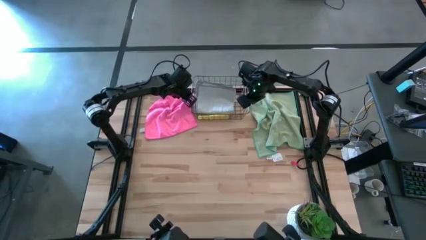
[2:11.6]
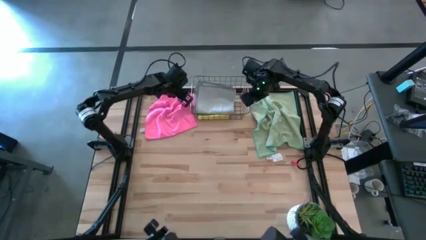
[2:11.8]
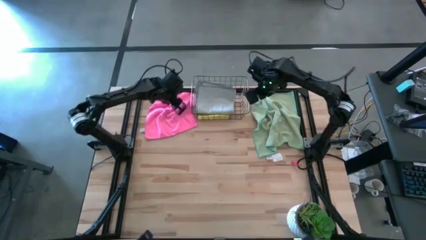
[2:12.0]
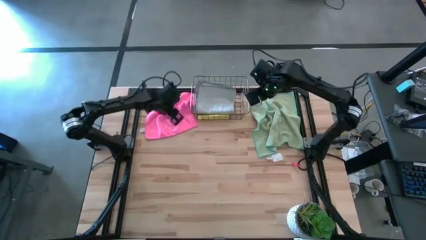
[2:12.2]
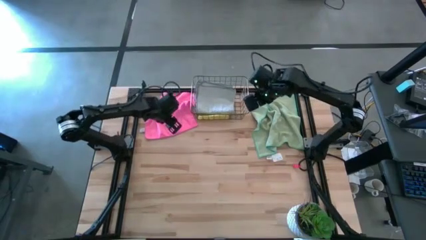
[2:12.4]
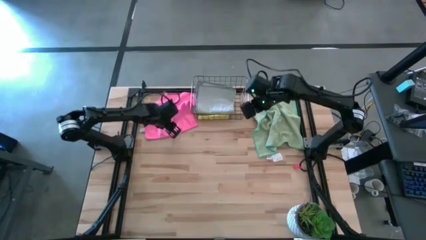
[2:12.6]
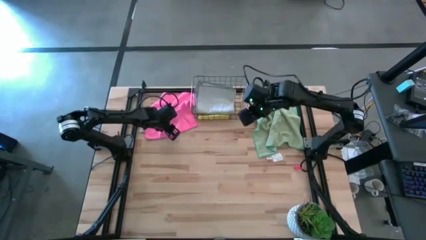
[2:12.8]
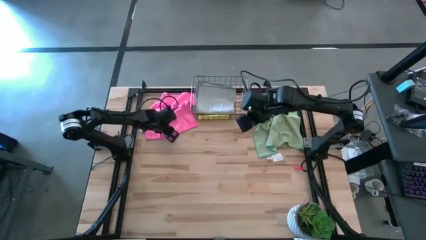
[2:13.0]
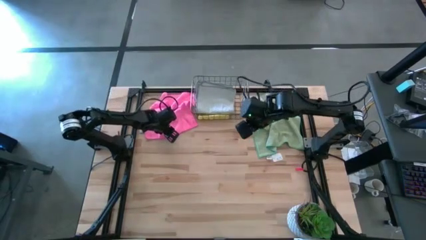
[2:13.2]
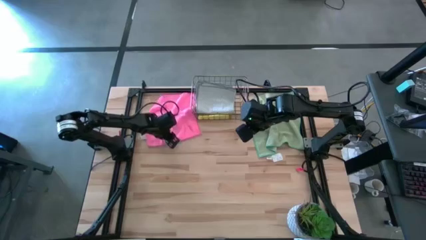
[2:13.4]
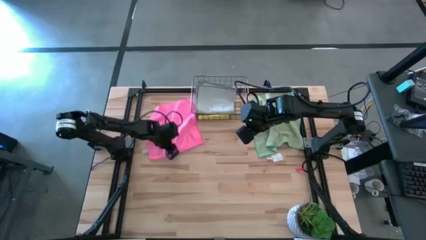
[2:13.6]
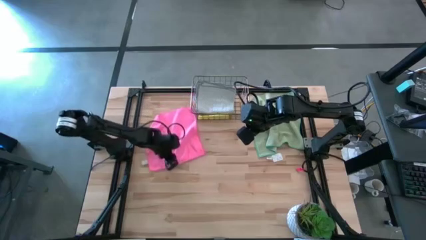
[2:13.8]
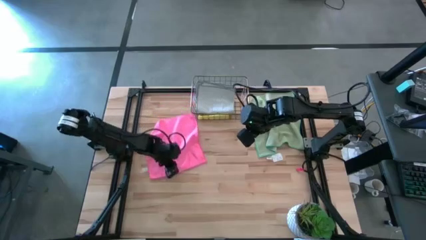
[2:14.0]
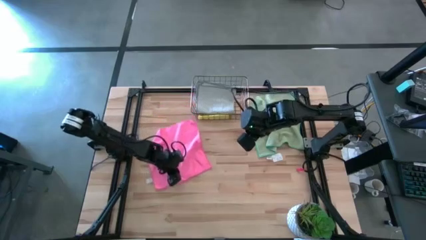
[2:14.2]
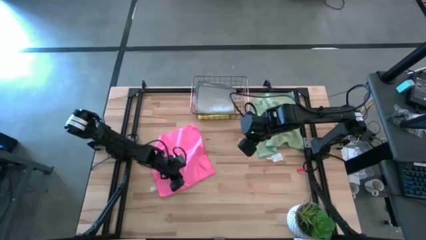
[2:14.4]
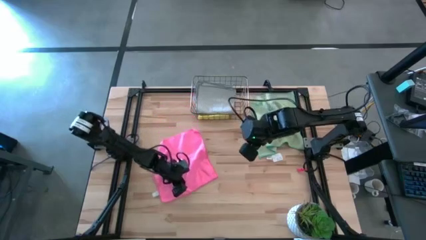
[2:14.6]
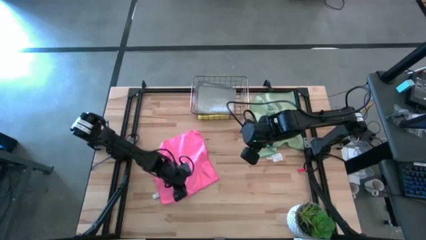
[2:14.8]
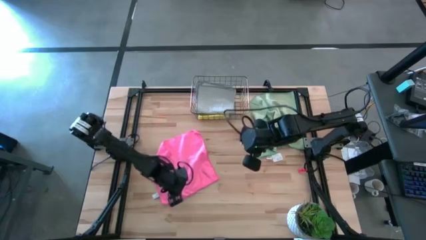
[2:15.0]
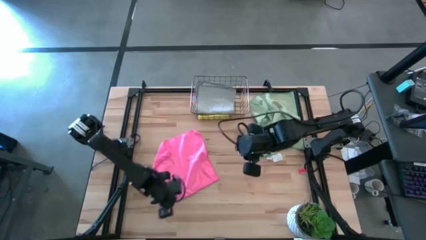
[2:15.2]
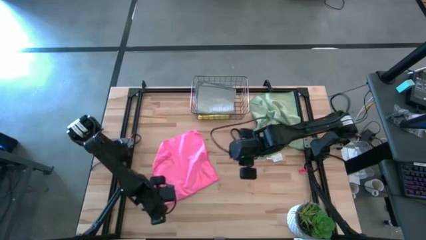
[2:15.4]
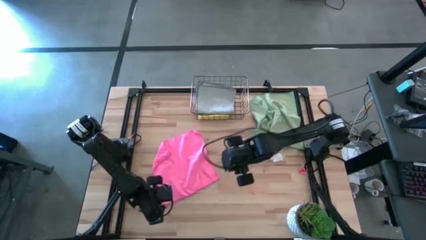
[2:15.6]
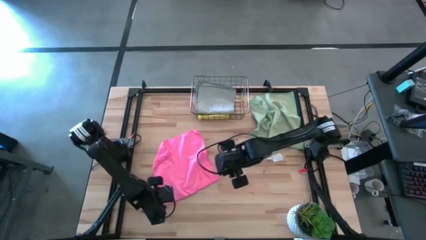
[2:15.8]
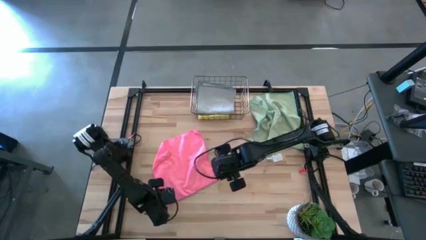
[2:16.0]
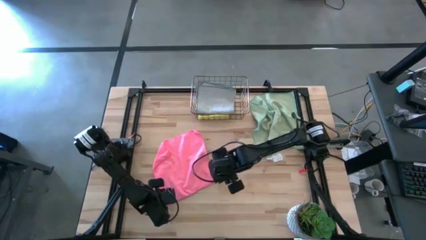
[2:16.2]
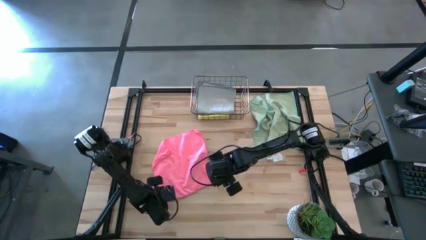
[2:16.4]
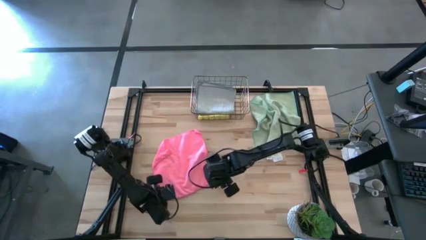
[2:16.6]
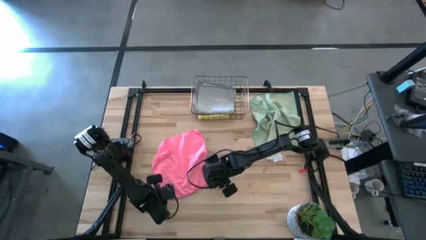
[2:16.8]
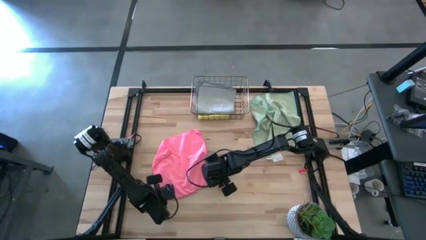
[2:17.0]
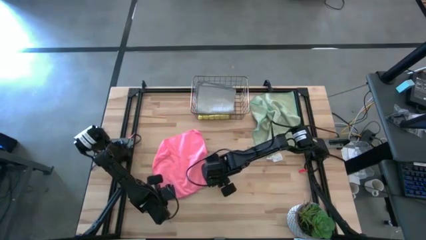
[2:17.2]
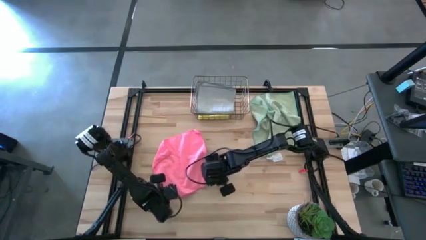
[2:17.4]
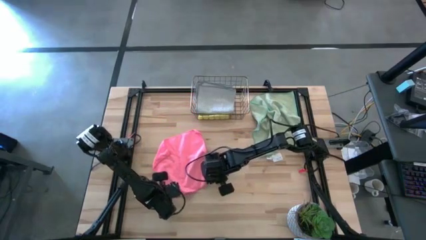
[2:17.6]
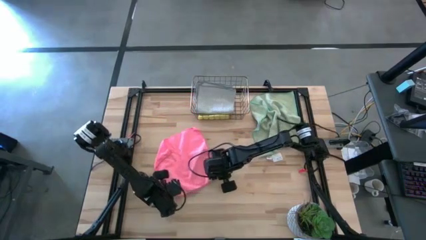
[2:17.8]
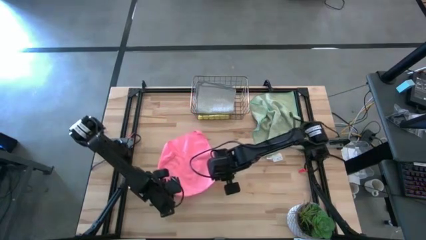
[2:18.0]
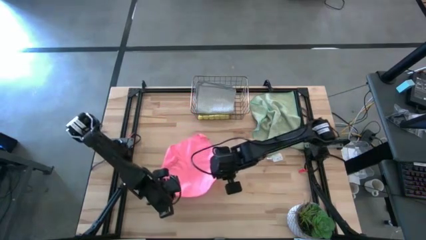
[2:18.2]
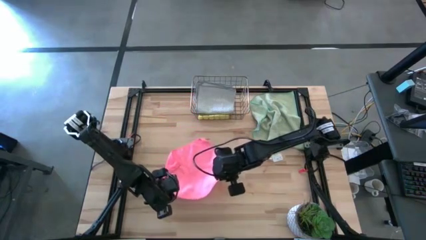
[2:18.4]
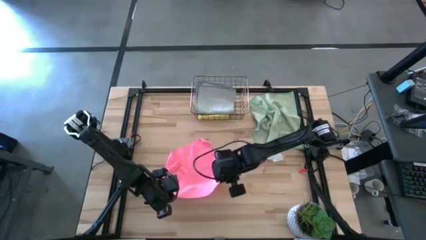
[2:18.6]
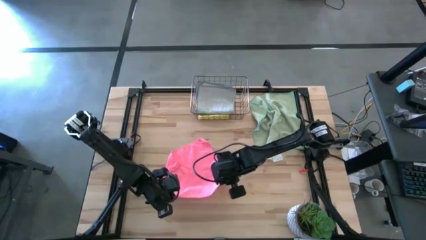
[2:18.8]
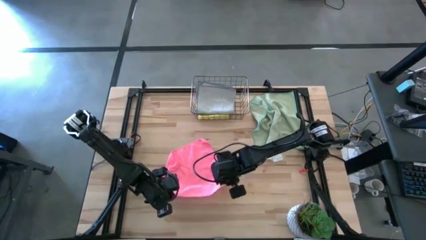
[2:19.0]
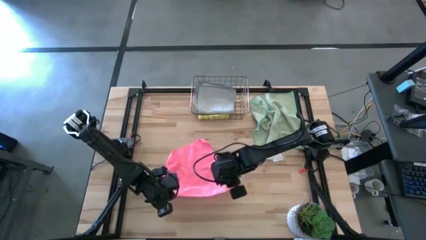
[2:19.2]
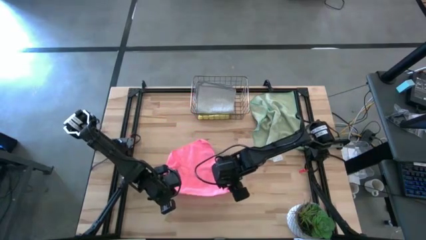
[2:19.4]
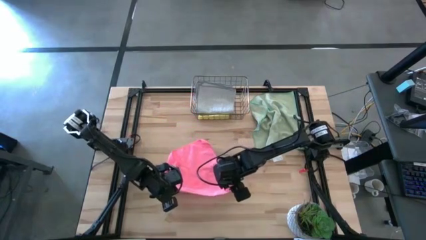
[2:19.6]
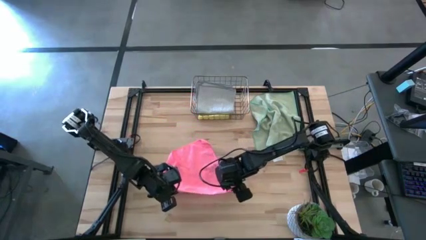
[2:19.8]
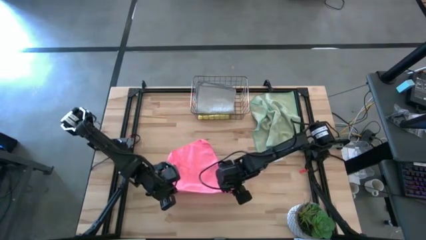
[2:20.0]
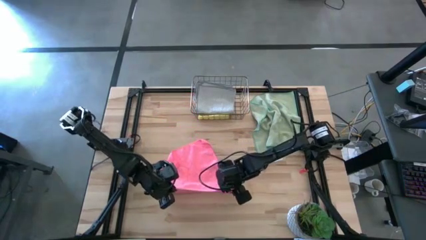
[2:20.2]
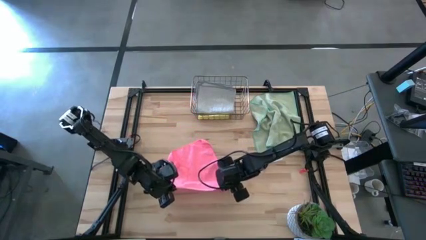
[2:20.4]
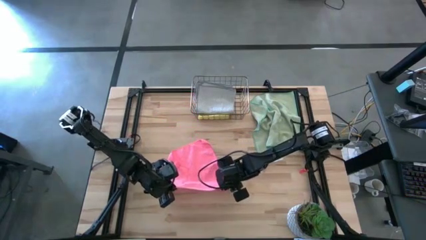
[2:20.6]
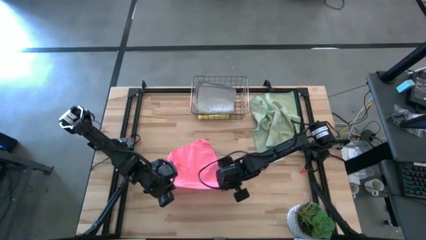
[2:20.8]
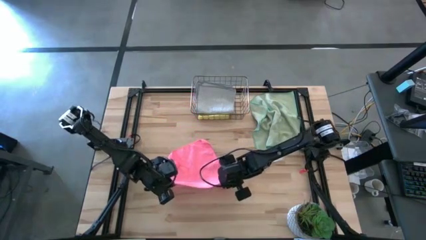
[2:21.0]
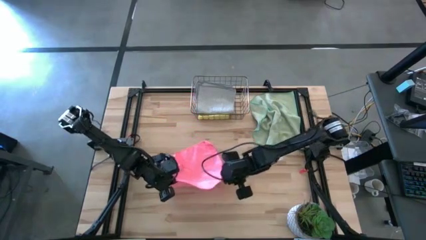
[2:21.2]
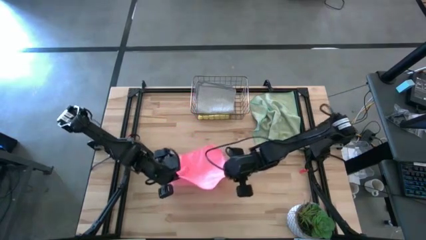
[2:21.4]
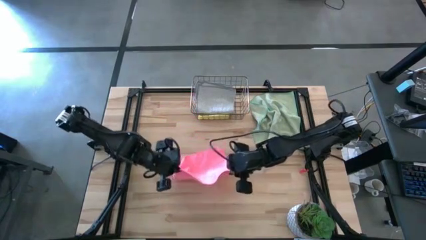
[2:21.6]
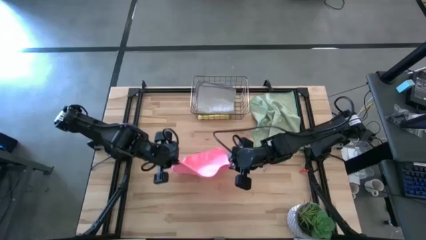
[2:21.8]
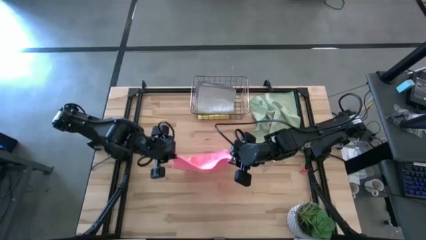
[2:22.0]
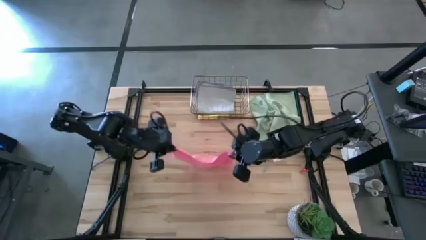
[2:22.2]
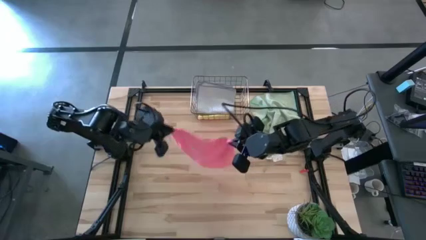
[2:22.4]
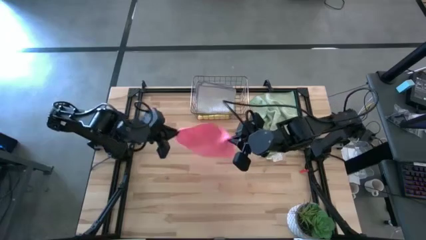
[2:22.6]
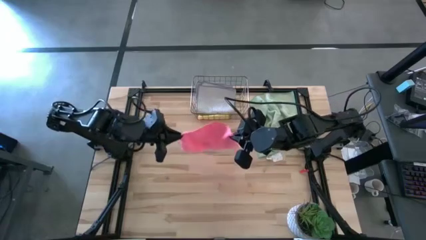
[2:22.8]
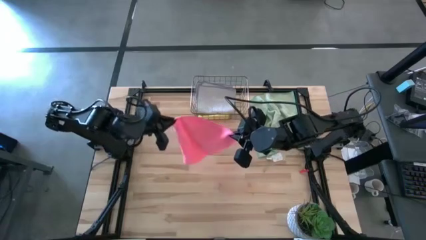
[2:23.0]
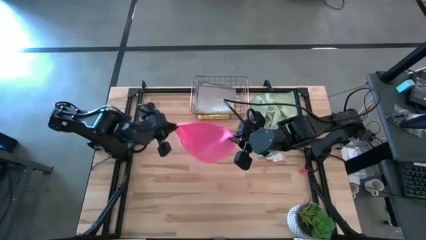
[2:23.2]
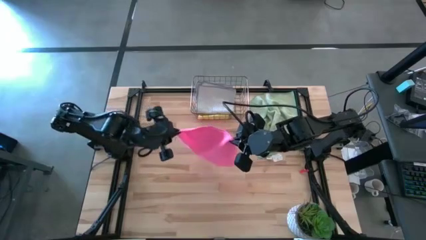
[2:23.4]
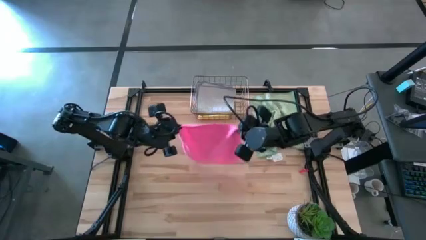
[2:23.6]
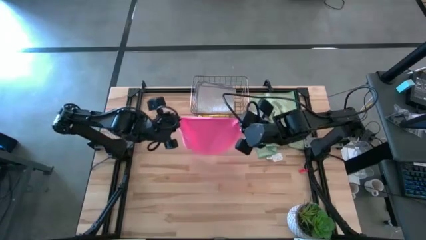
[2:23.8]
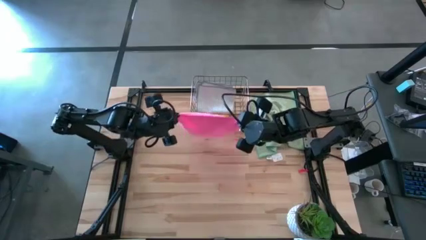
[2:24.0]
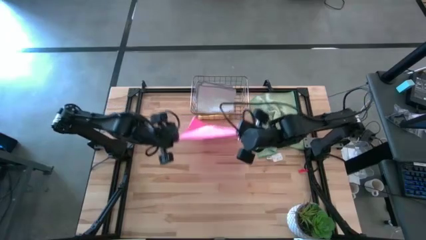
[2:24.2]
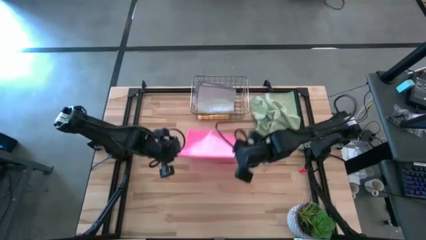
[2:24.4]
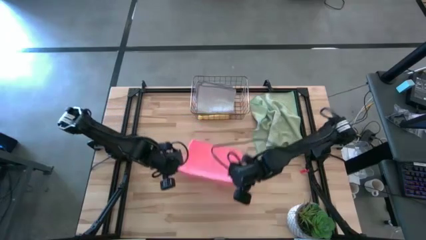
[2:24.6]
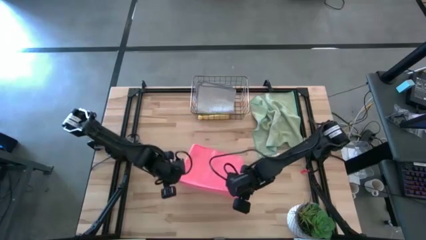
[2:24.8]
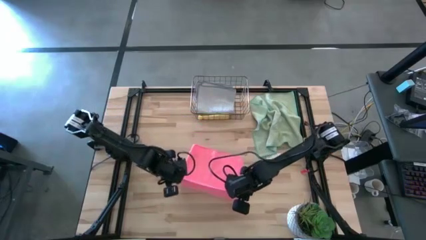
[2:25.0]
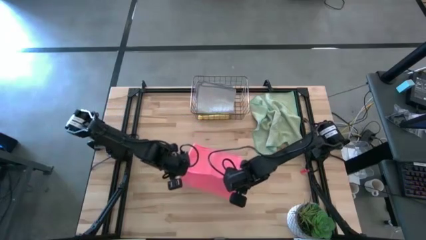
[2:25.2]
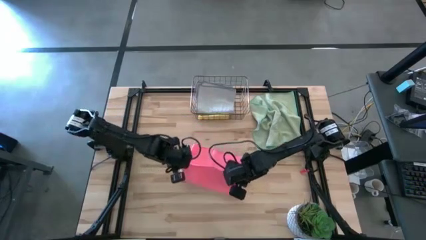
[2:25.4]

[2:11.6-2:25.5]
Task: Fold microfiber towels
Fold the pink towel
